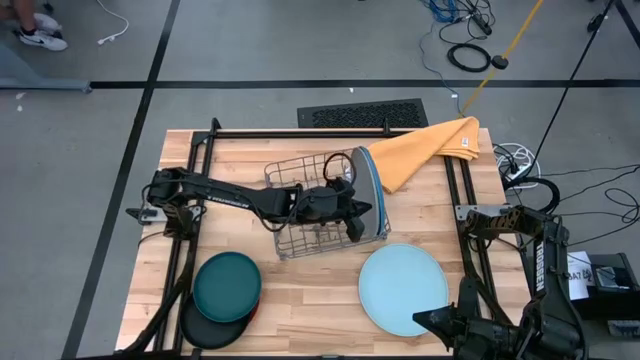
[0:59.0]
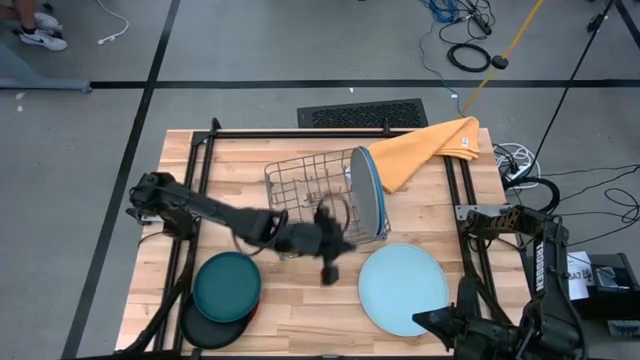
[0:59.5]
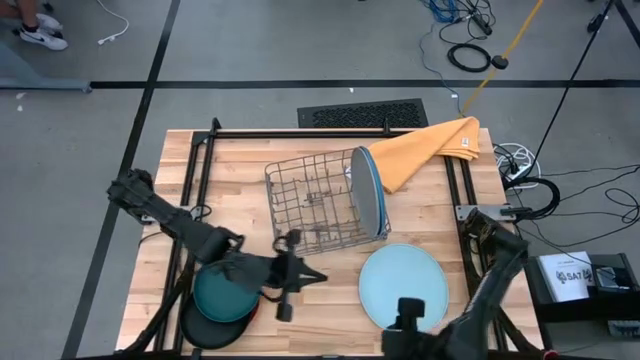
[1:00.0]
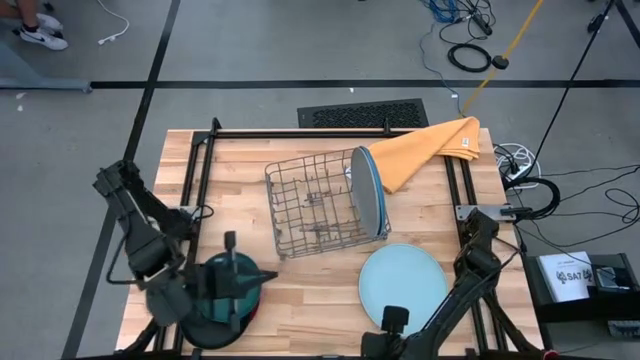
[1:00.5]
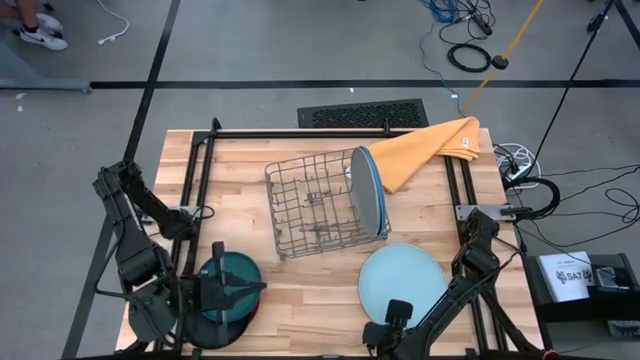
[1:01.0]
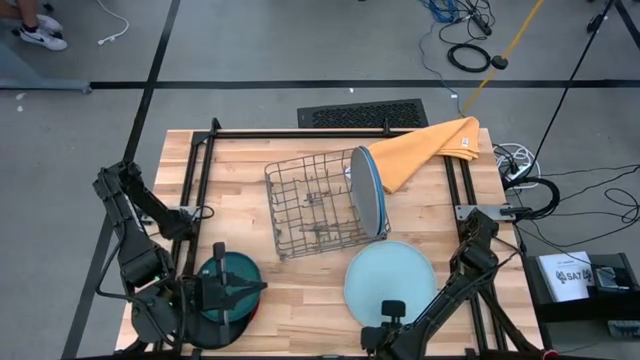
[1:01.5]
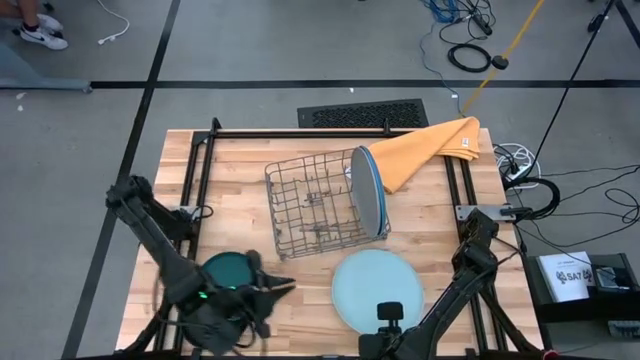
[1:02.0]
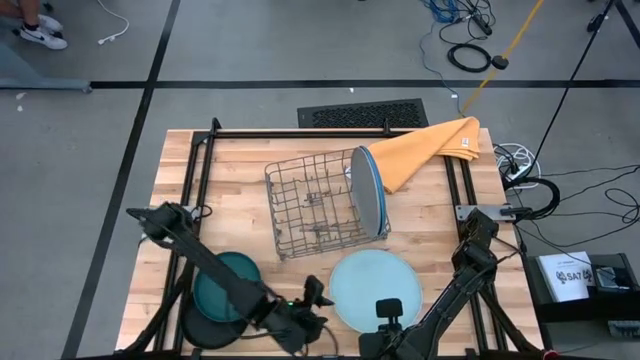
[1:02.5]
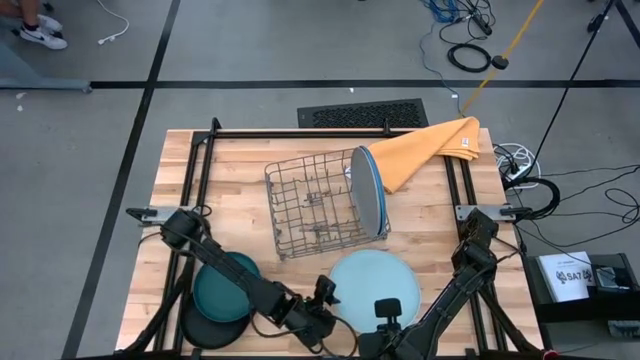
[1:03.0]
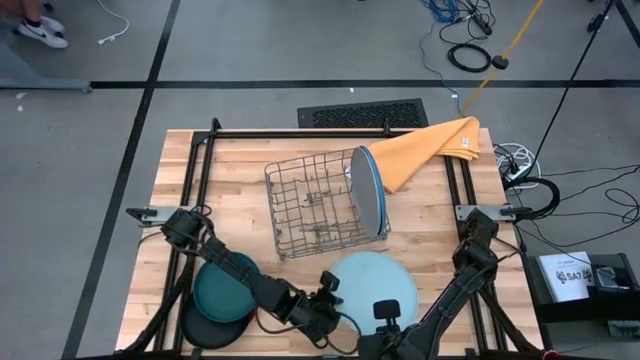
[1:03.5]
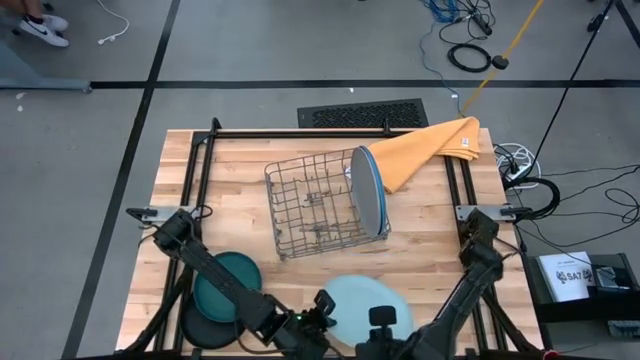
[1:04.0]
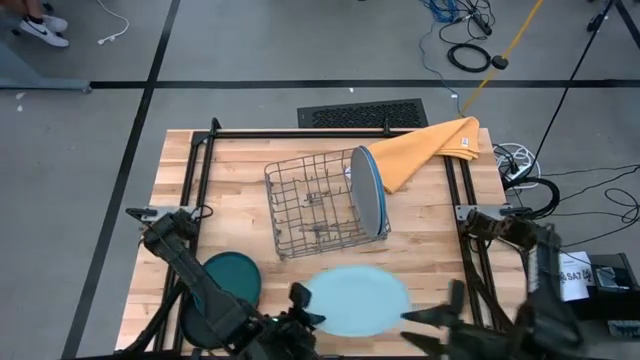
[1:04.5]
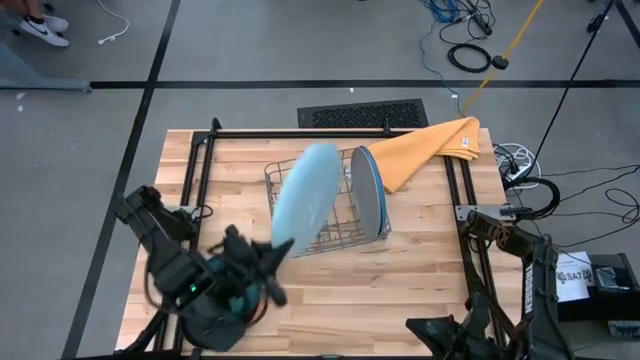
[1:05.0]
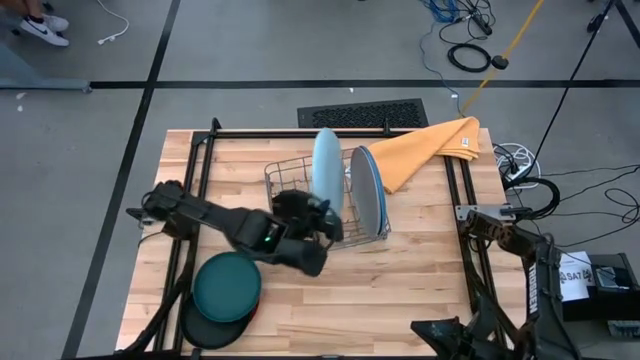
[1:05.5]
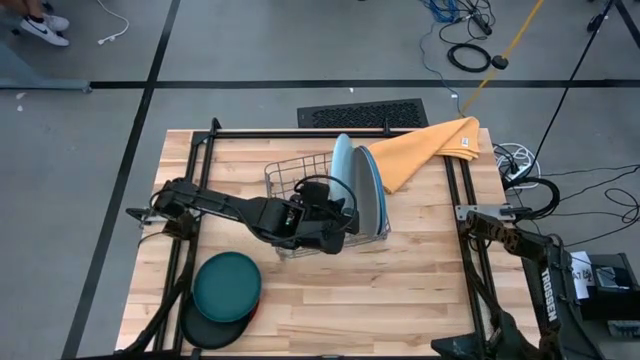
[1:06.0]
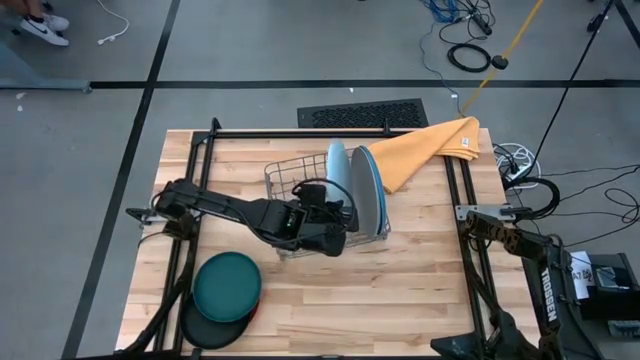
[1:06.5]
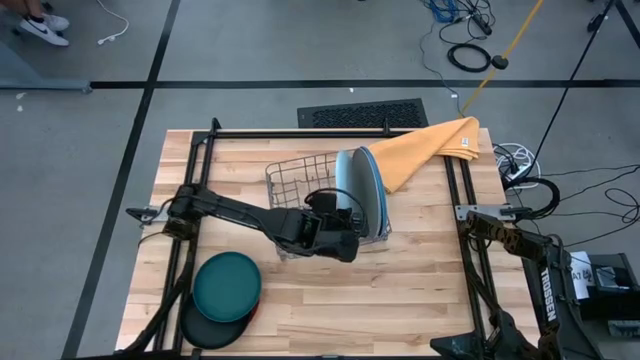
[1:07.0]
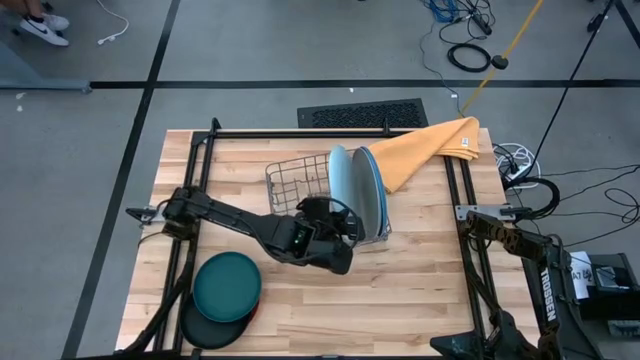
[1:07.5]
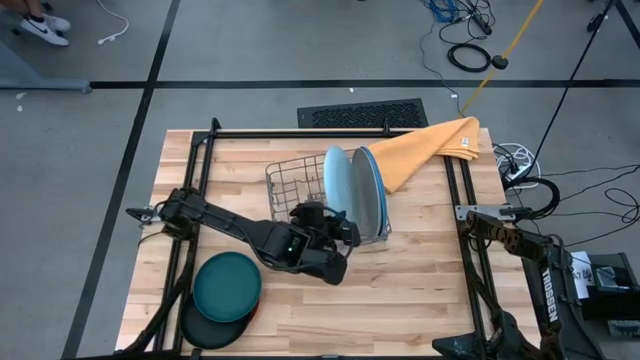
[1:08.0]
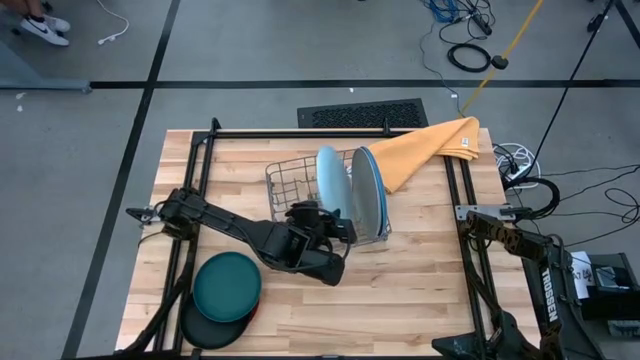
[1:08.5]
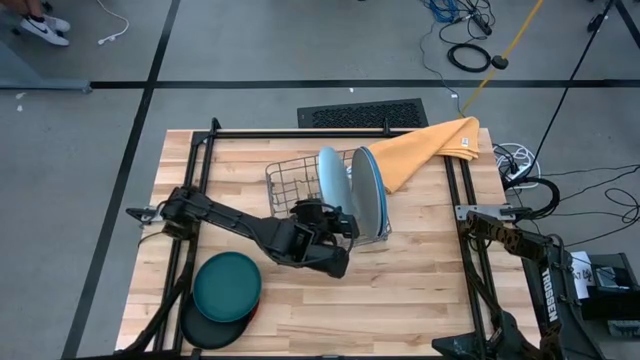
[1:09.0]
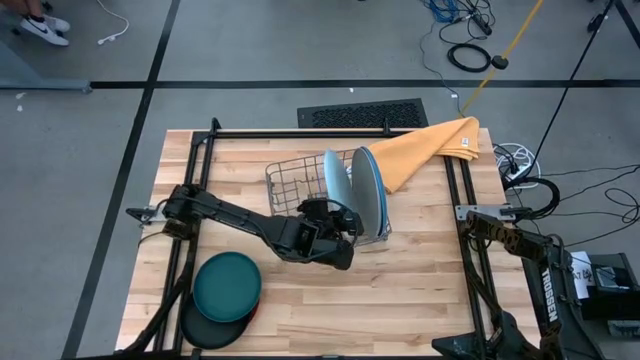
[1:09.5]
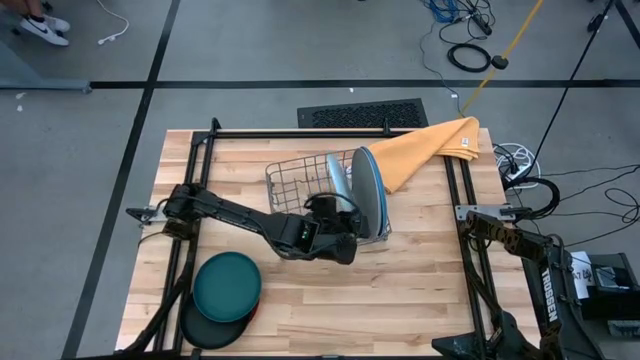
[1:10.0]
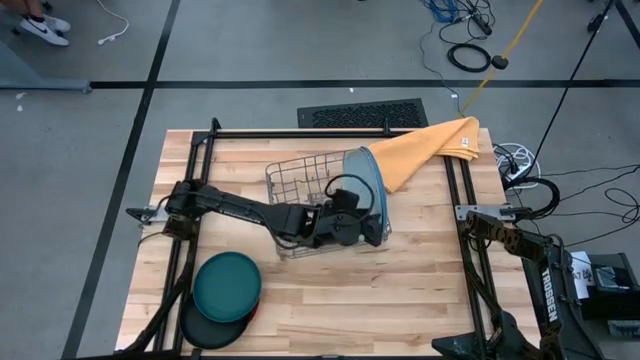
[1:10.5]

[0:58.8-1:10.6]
Task: Sort dishes
Put the light blue plate into the green dish rack

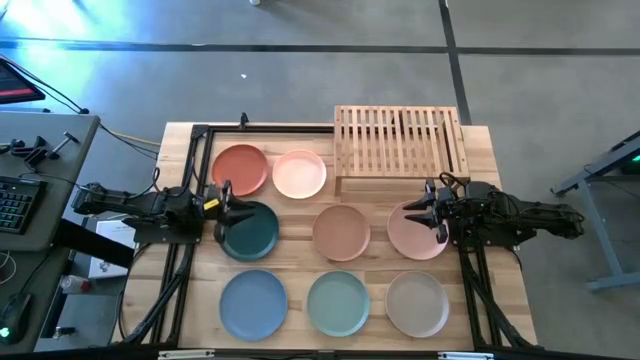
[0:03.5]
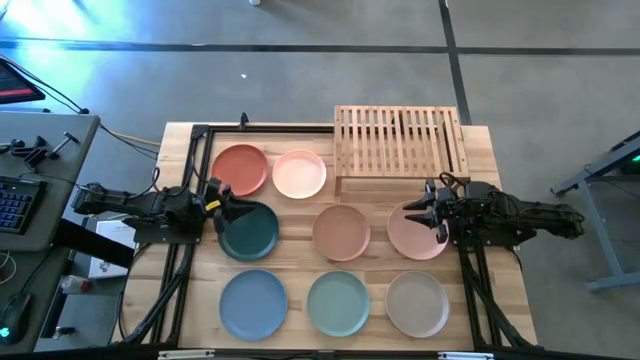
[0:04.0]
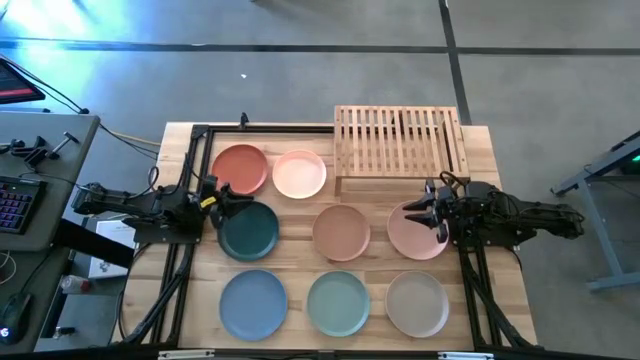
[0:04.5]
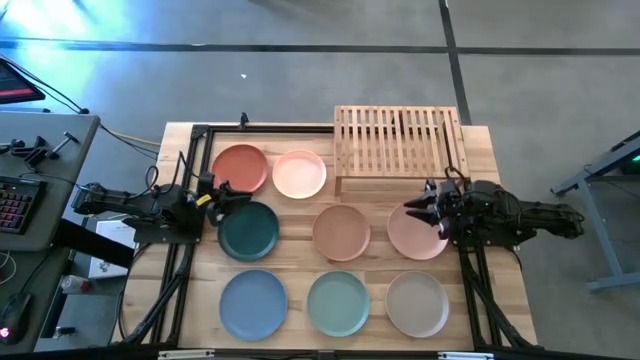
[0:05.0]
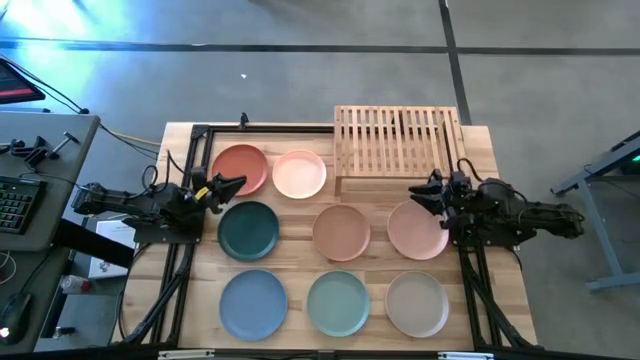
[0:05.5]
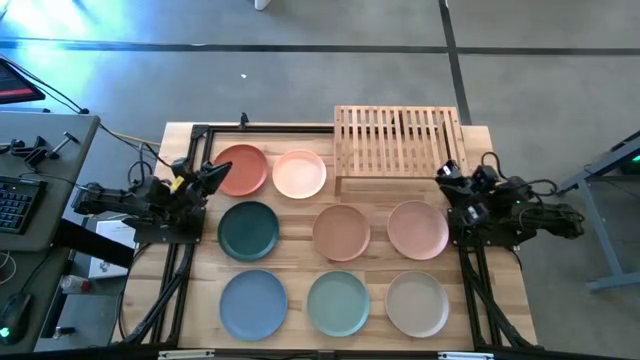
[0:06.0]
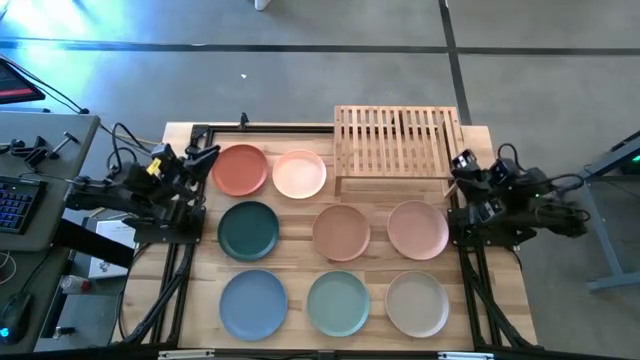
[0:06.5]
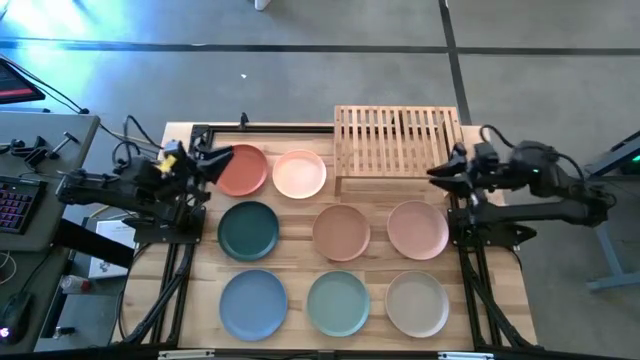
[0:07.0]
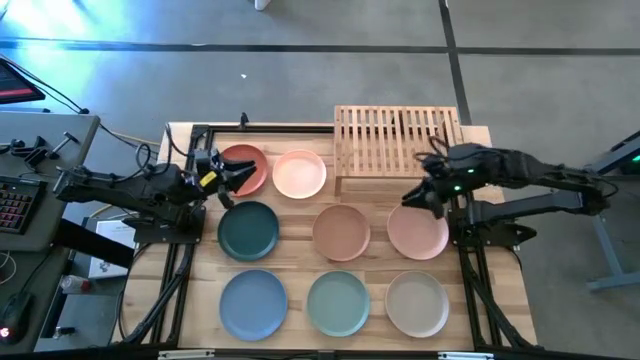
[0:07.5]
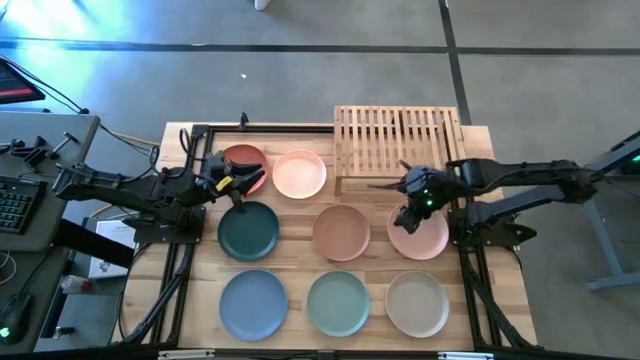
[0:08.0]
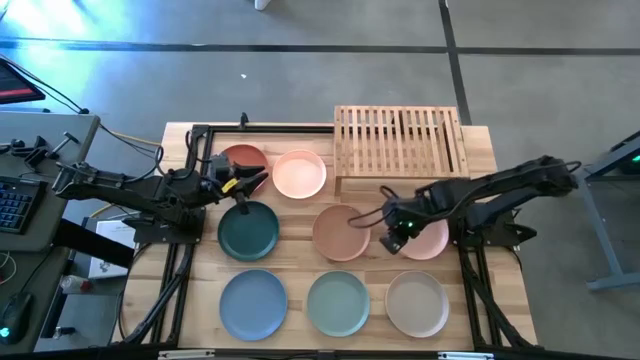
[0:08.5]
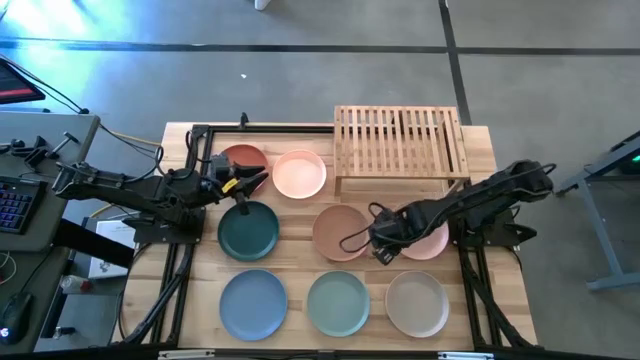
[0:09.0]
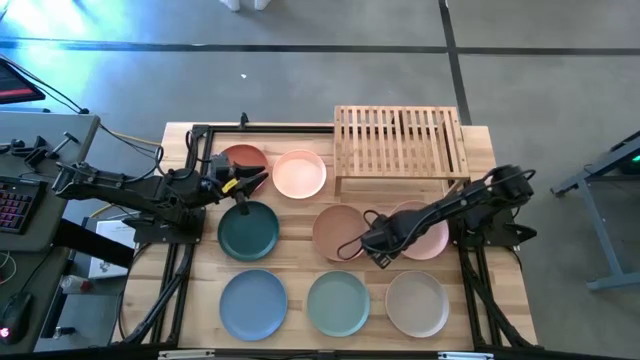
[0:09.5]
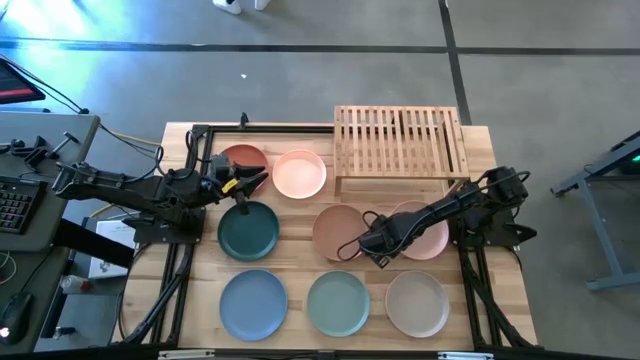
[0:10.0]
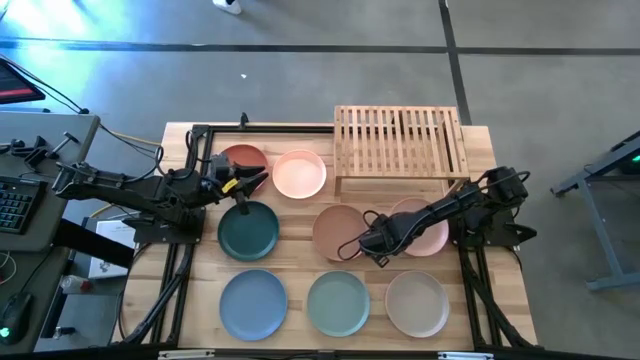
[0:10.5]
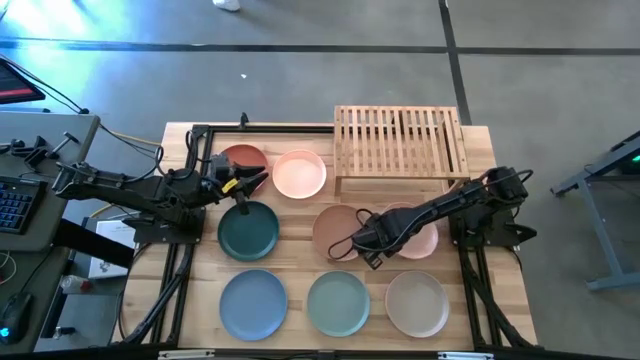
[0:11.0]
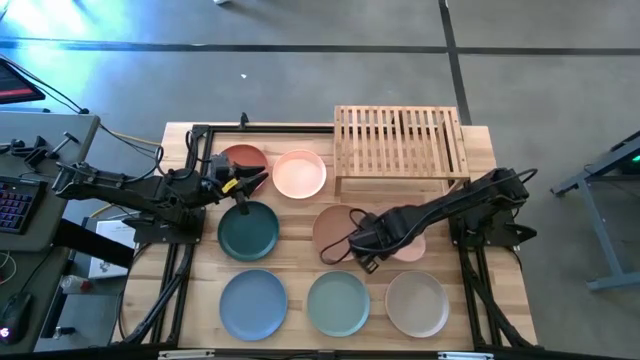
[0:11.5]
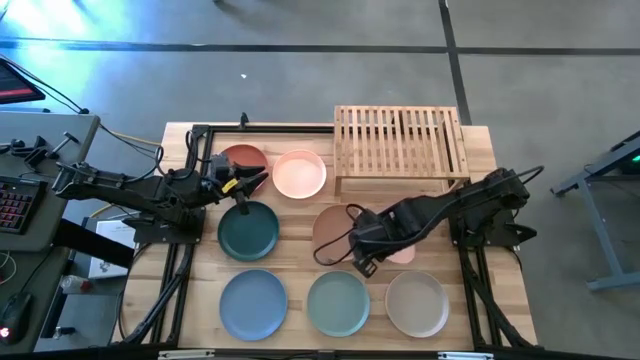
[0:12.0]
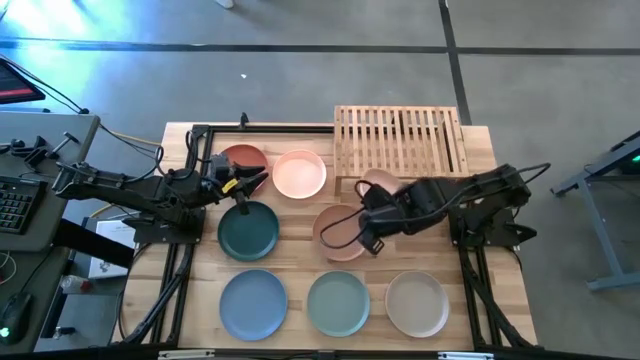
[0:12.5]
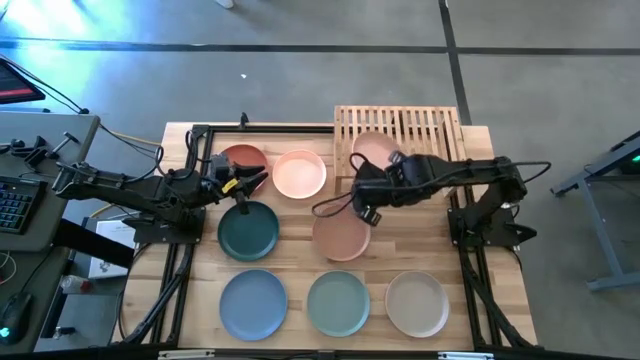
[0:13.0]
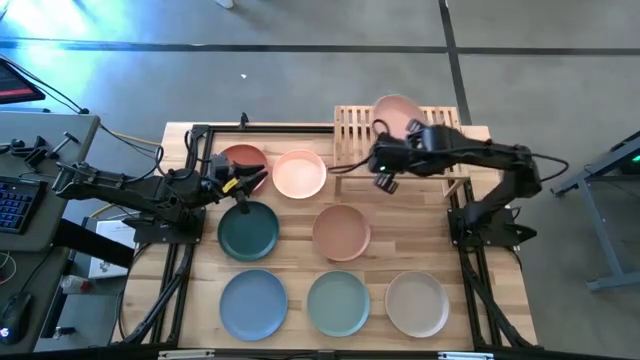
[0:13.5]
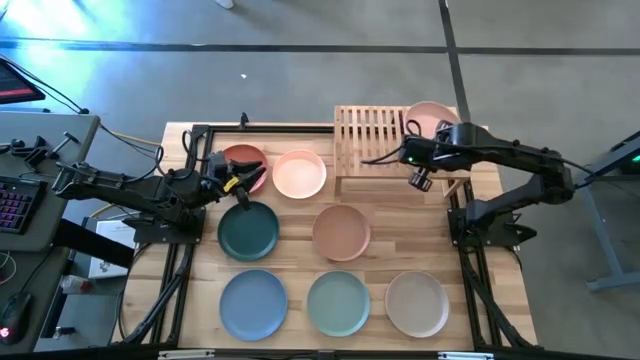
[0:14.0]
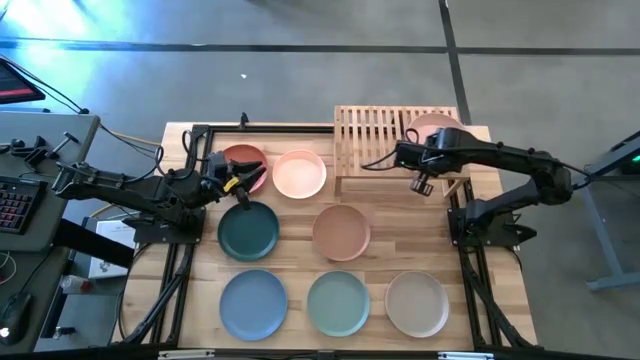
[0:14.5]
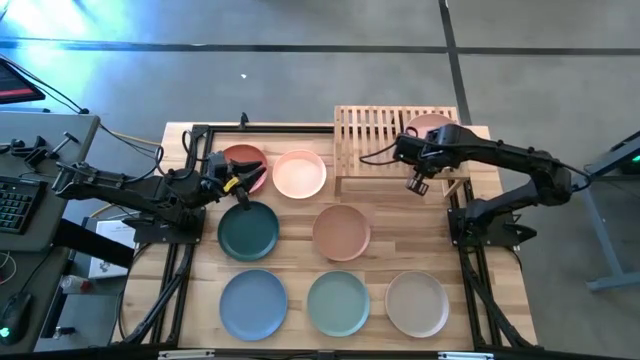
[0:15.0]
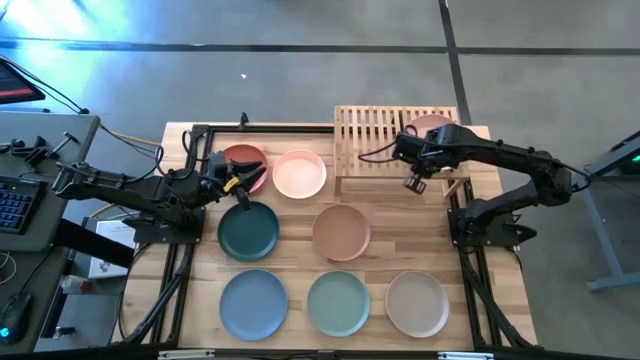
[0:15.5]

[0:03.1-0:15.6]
Task: Place and stack plates onto a shelf
Put the light pink plate on the shelf
